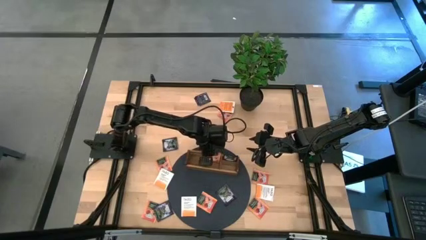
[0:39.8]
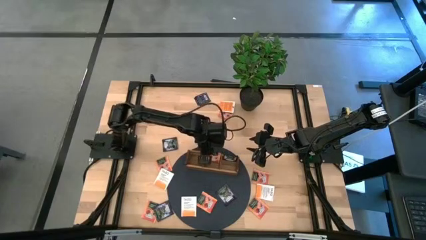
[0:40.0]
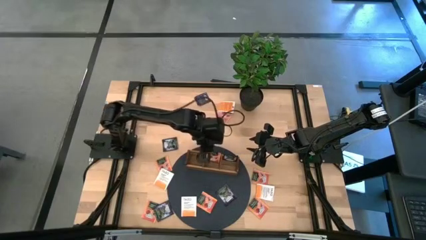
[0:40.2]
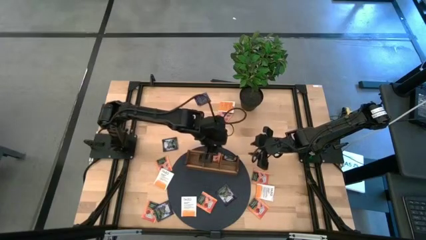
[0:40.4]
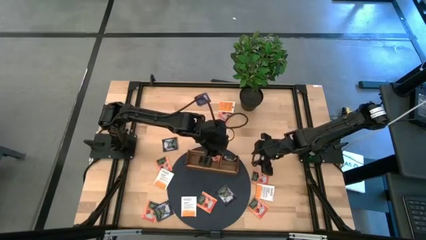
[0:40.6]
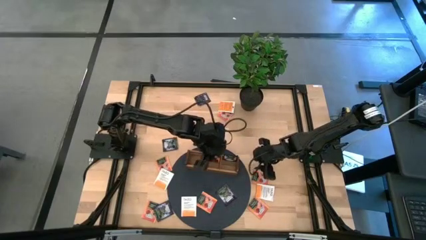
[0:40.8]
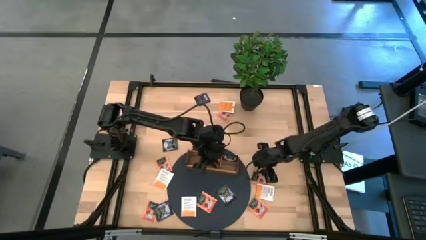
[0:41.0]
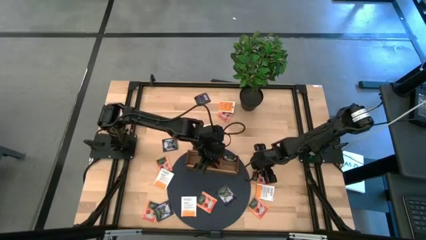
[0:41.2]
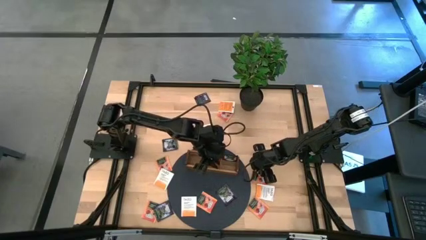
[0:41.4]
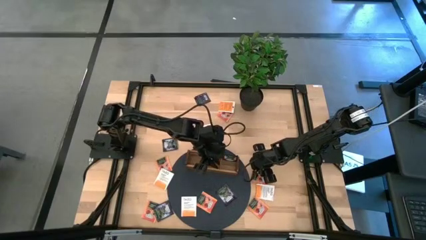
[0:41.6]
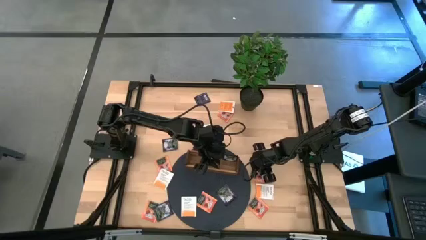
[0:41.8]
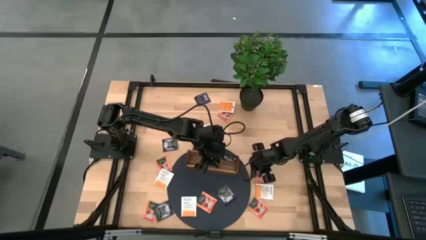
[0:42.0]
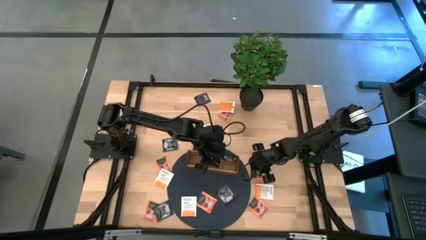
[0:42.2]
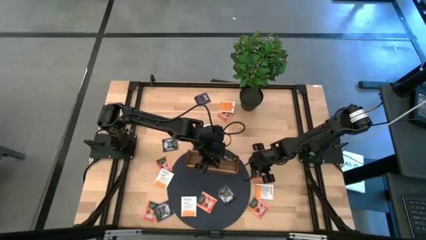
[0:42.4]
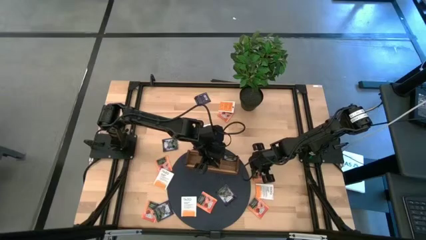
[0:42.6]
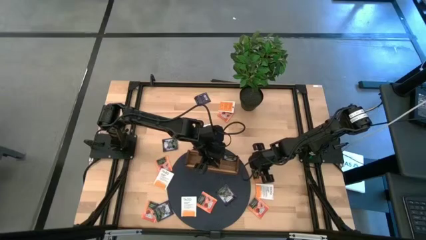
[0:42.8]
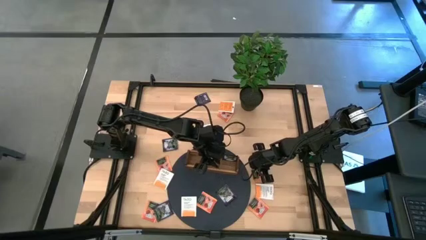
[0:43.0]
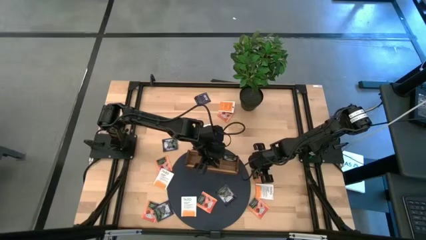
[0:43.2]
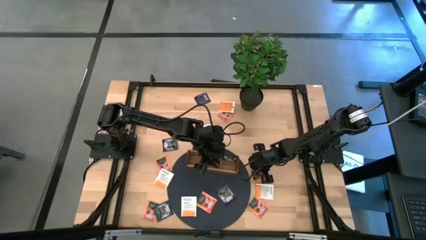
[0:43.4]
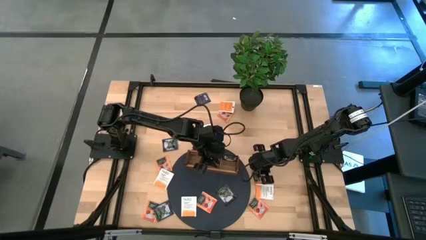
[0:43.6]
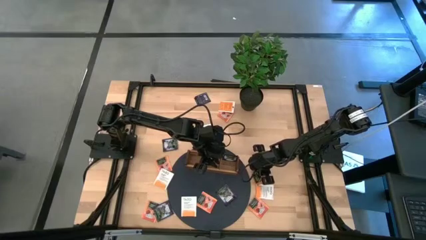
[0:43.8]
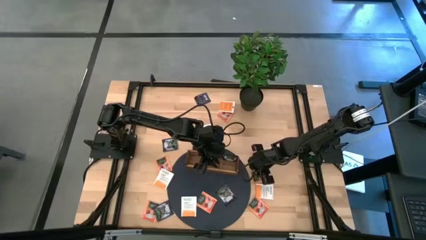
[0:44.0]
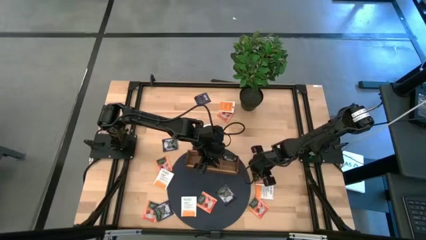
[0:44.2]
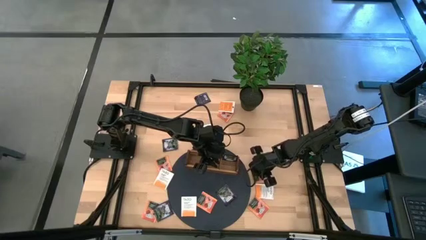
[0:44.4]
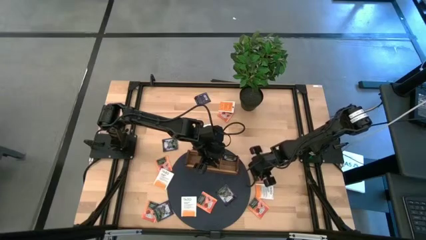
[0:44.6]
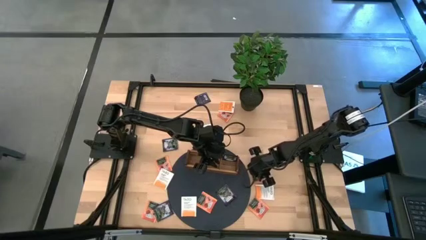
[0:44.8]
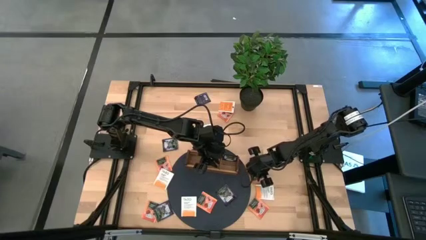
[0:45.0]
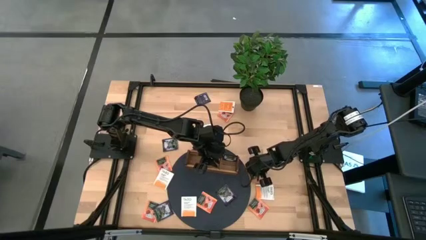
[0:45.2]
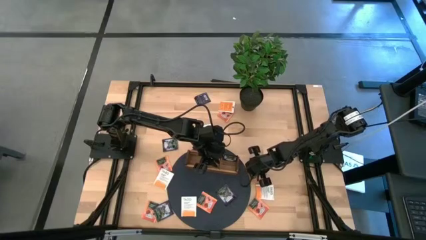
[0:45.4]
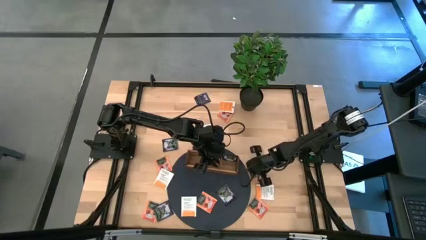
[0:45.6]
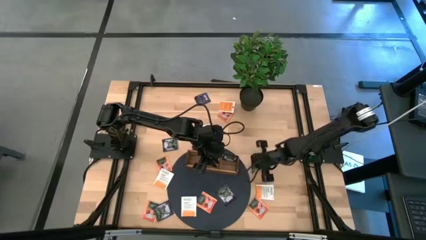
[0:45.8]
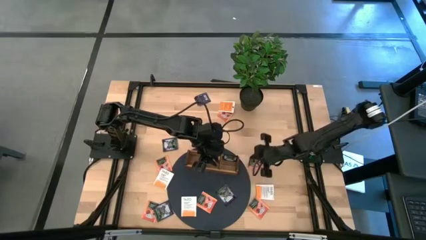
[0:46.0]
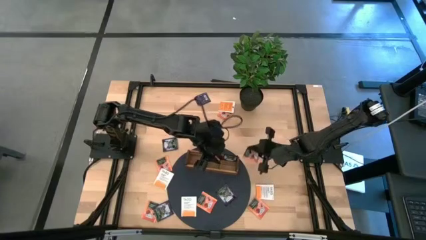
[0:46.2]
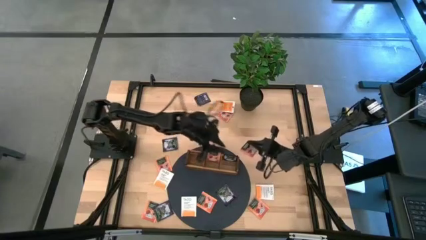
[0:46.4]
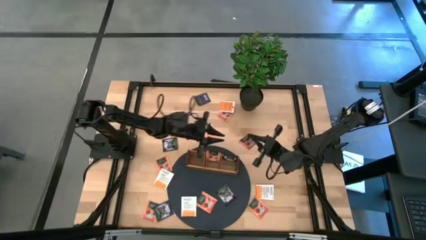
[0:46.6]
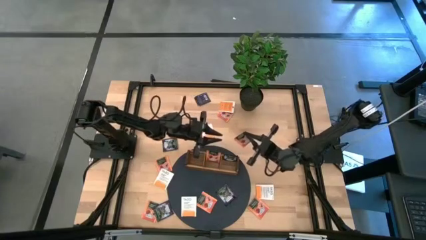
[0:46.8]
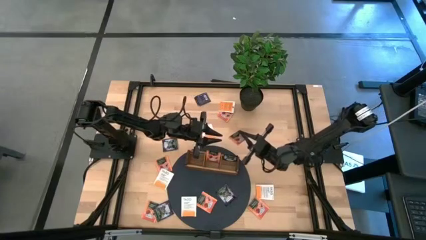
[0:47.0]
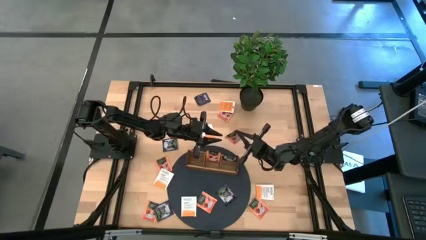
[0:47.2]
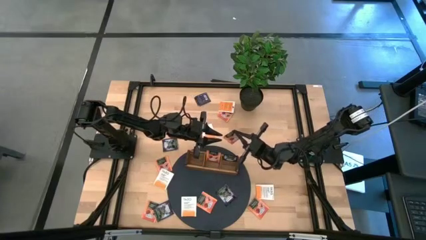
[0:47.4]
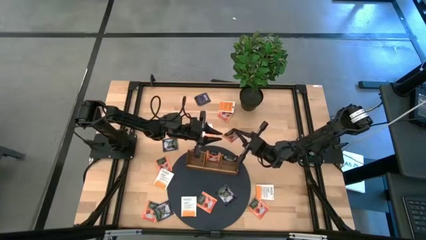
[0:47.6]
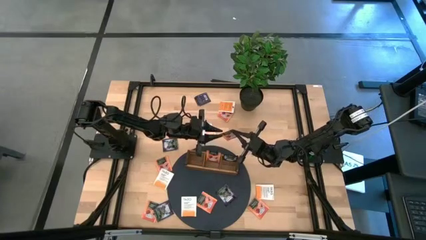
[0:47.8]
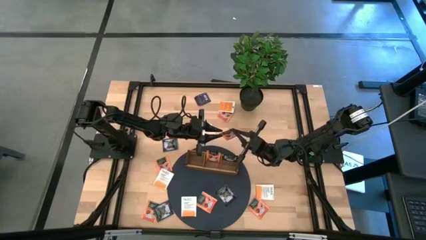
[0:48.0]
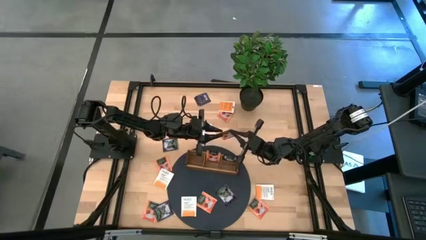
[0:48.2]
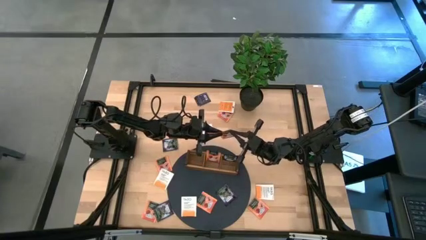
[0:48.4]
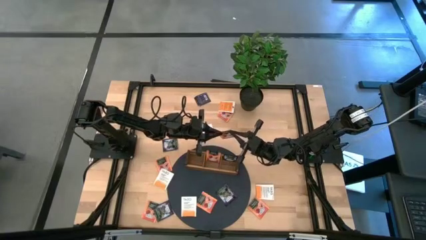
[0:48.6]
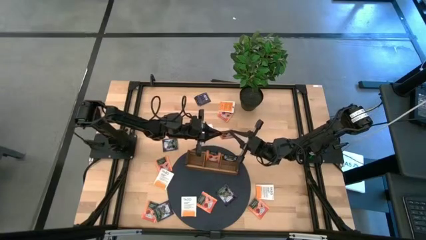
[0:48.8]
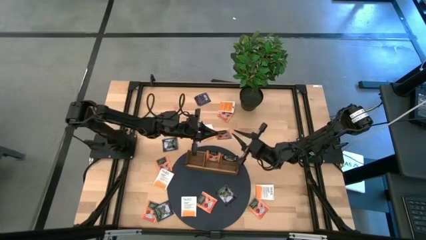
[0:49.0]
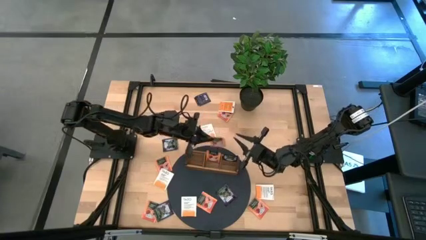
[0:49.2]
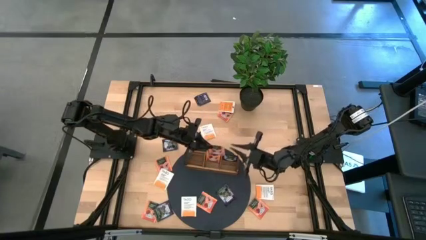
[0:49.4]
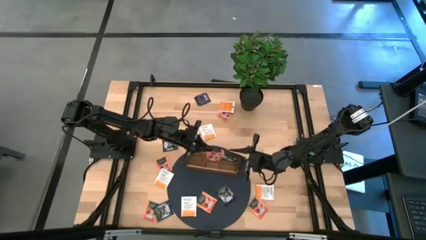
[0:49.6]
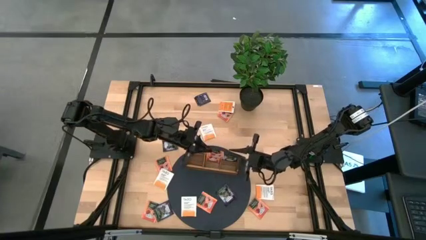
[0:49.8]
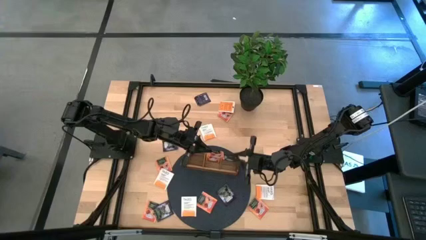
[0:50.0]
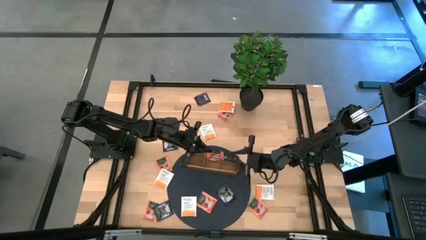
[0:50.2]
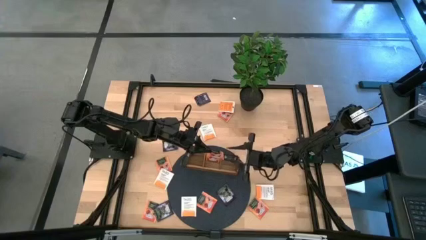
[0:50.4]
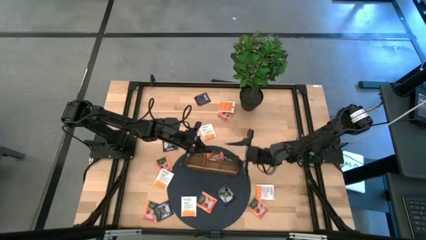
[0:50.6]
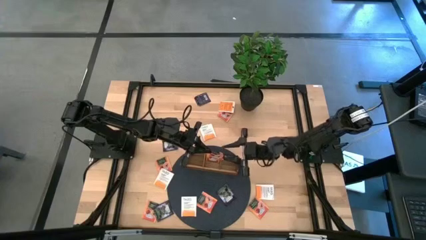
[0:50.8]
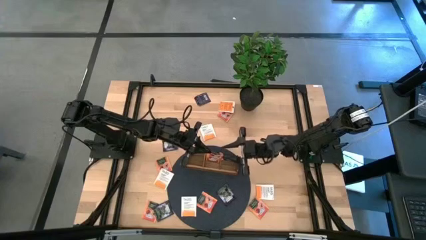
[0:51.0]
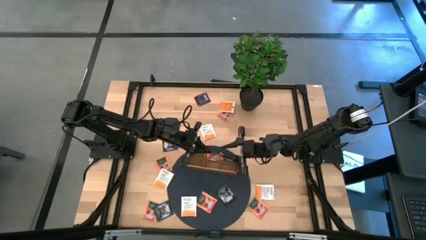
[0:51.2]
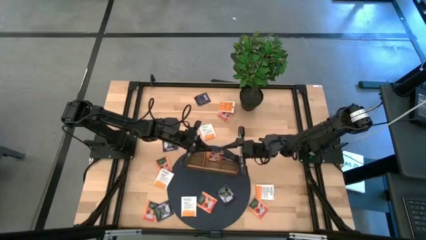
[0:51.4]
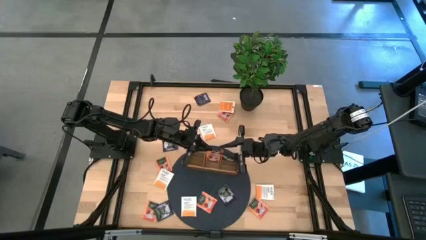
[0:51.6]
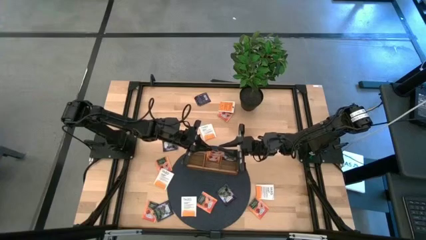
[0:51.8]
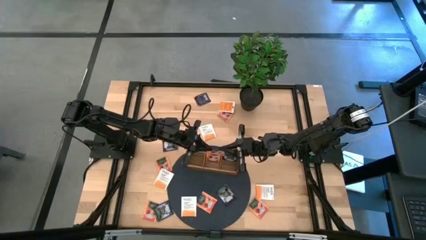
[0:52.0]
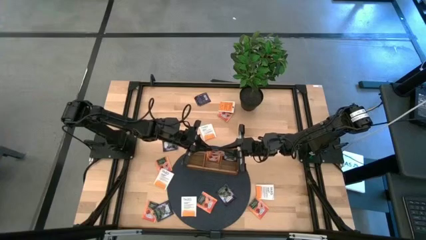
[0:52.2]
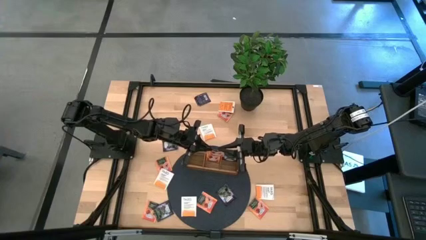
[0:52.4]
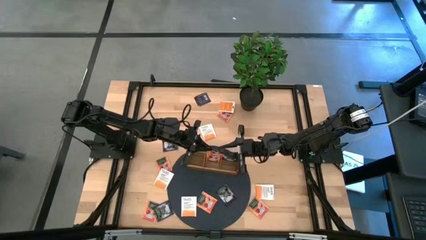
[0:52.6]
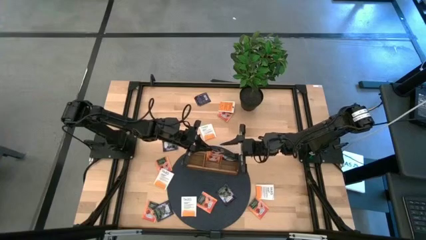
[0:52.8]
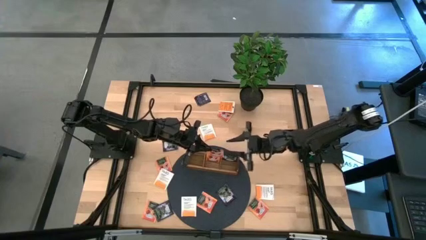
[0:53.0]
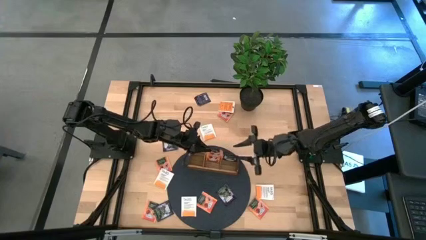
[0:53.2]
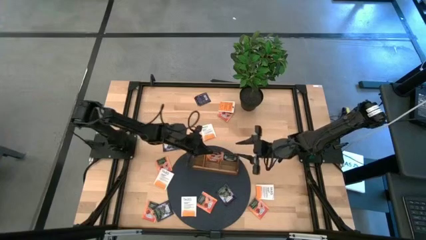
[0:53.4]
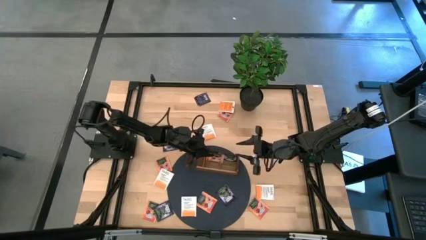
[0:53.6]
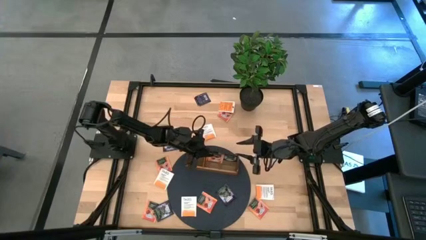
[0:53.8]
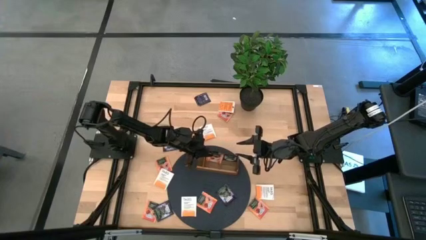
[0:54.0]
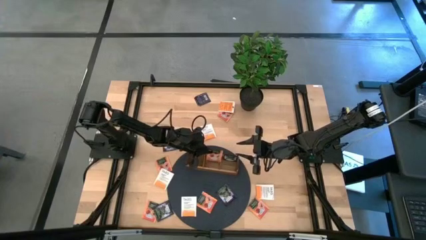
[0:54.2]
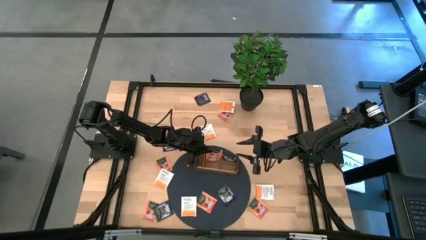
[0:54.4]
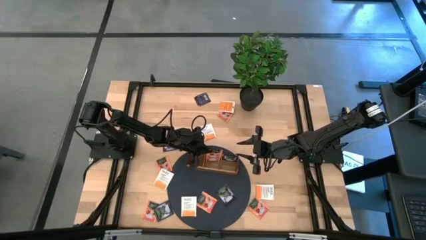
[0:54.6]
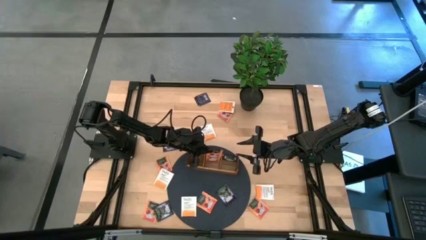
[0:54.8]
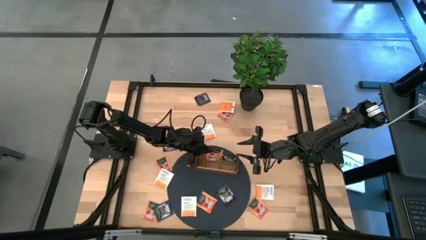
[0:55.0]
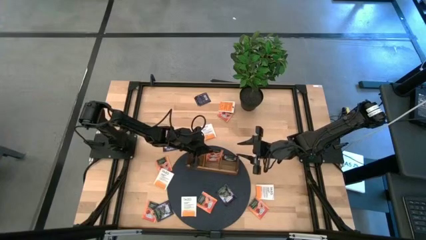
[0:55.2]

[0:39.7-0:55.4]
Task: Pick & Place Tea
Put the orange black tea bag into the middle section of the wooden organizer

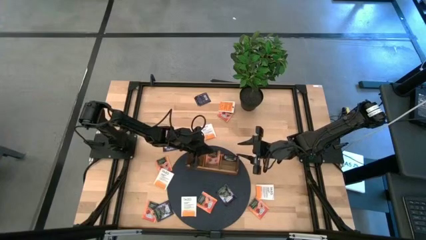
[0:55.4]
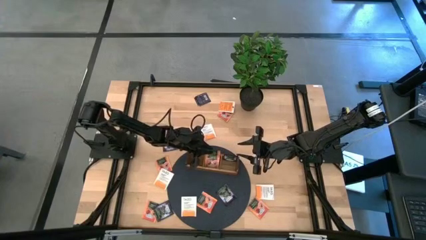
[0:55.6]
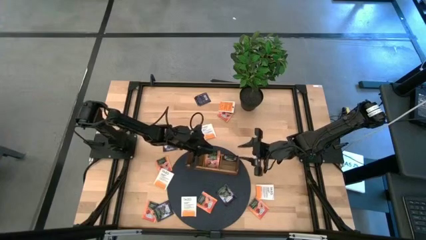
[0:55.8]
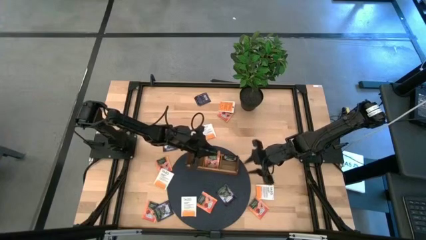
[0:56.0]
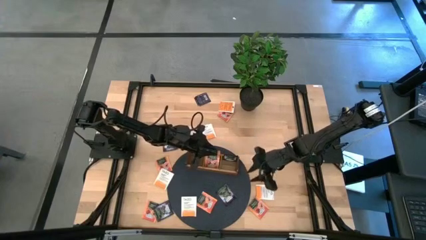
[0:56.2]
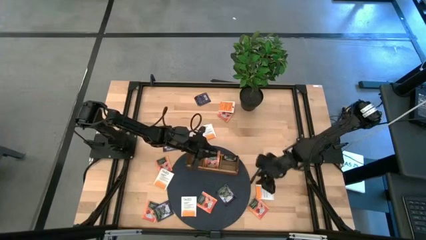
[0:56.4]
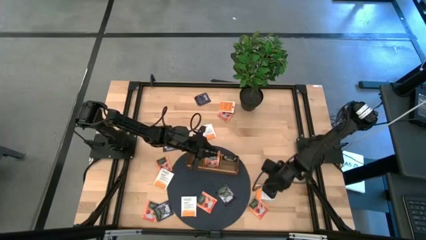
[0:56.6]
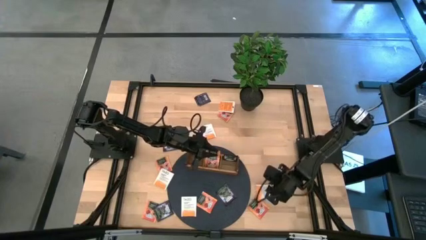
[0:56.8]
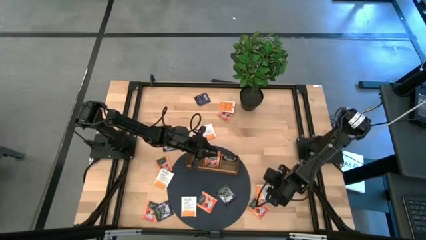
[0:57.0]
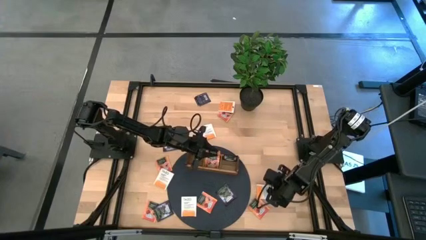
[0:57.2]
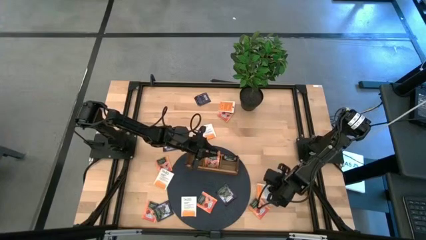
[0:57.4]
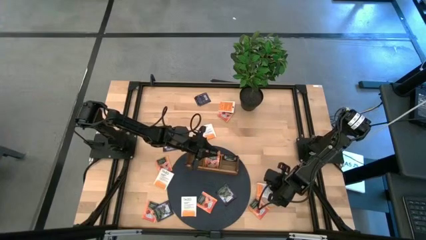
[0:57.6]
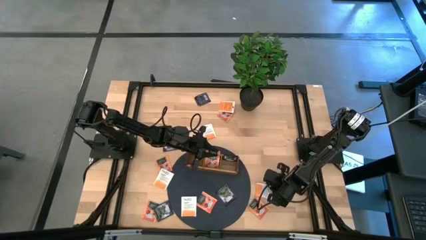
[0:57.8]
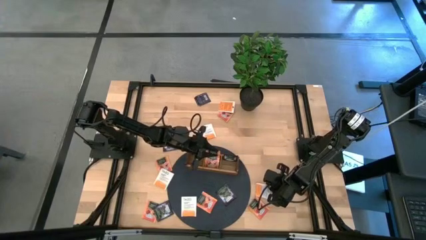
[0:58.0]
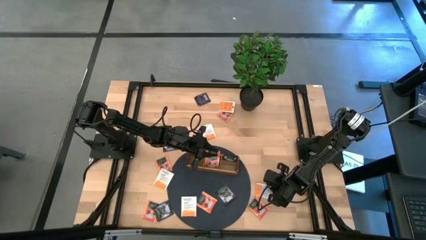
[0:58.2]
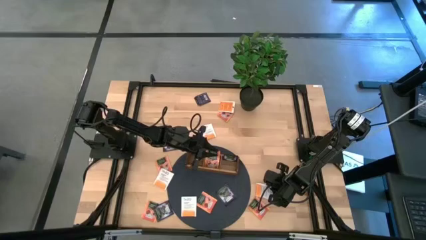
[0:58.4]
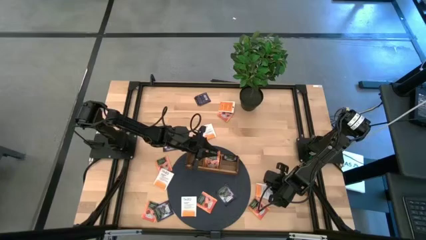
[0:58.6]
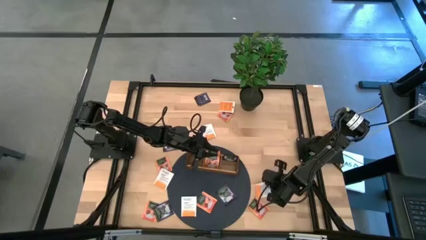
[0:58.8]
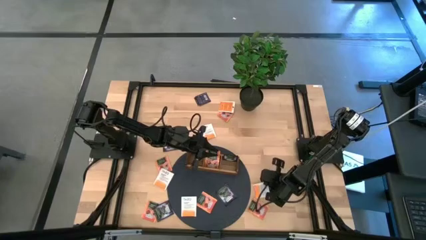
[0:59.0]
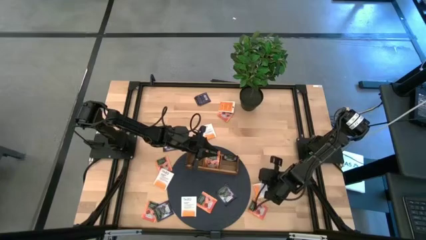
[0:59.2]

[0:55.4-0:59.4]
Put the white orange tea bag into the left section of the wooden organizer
